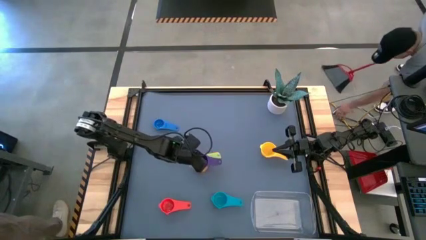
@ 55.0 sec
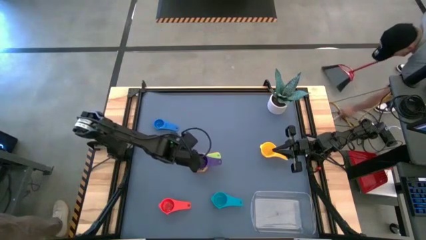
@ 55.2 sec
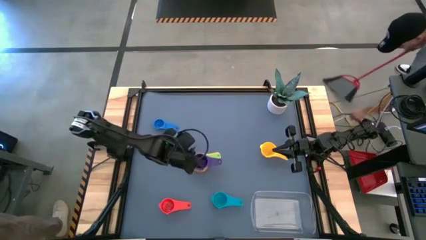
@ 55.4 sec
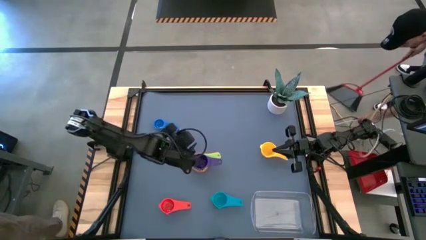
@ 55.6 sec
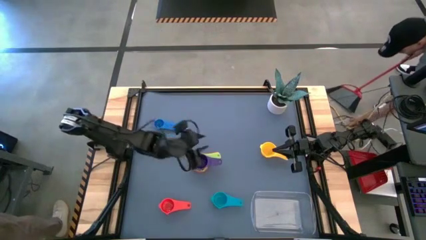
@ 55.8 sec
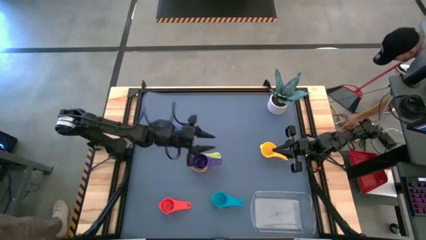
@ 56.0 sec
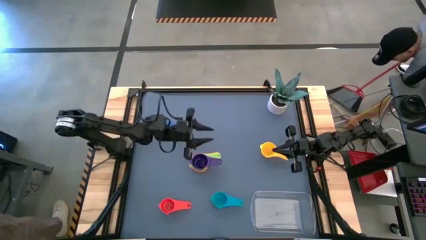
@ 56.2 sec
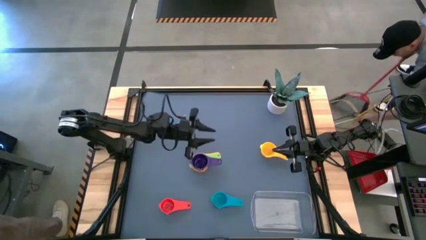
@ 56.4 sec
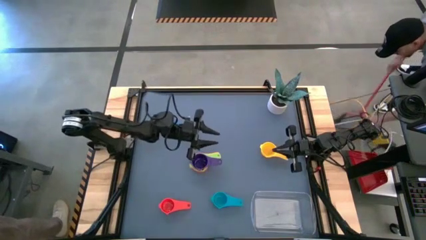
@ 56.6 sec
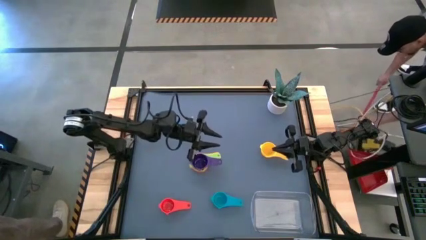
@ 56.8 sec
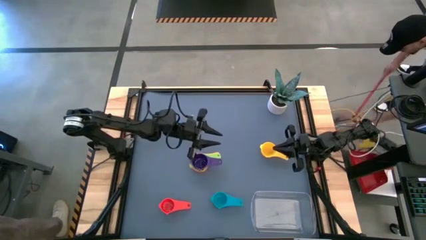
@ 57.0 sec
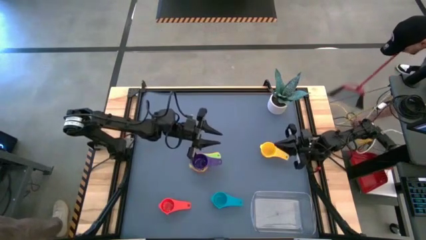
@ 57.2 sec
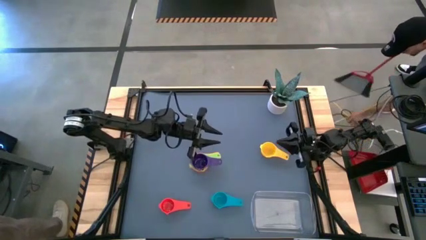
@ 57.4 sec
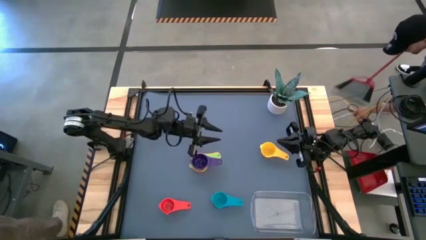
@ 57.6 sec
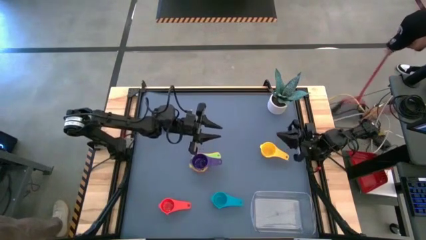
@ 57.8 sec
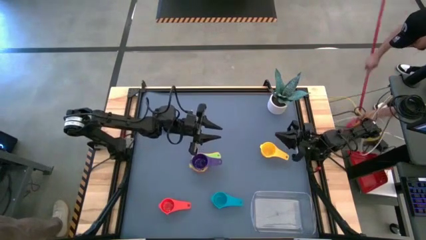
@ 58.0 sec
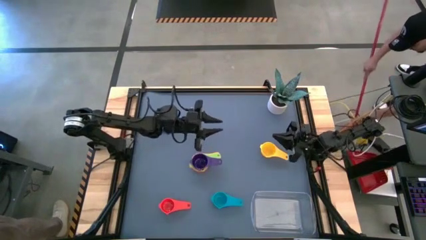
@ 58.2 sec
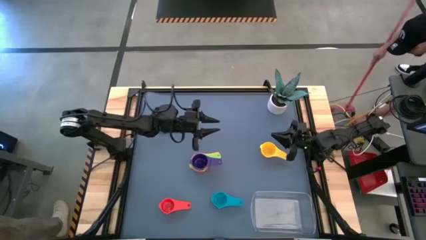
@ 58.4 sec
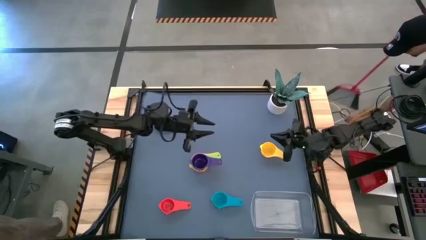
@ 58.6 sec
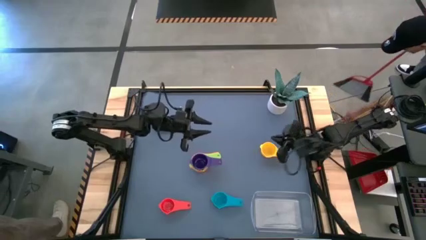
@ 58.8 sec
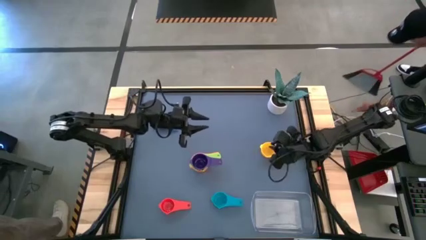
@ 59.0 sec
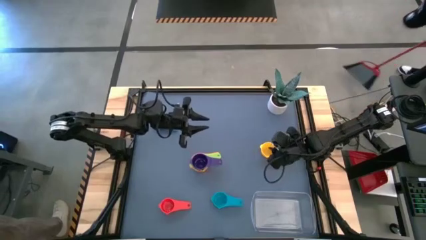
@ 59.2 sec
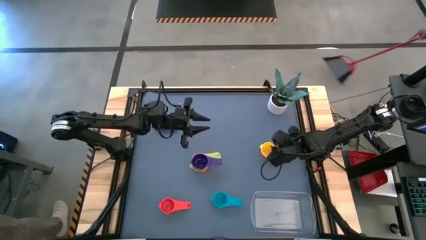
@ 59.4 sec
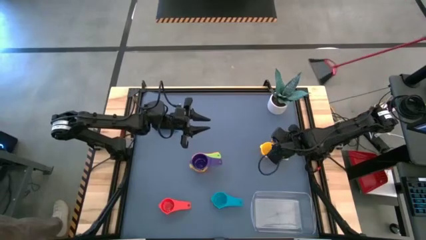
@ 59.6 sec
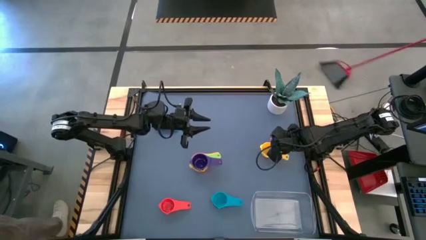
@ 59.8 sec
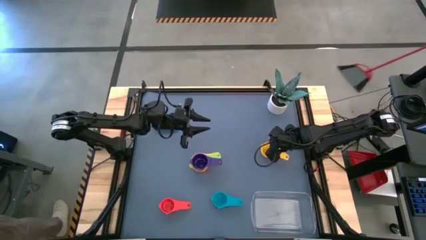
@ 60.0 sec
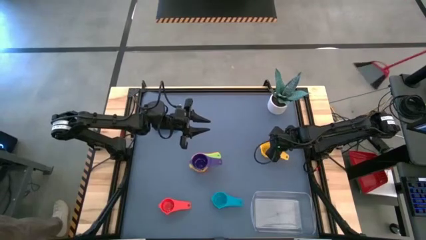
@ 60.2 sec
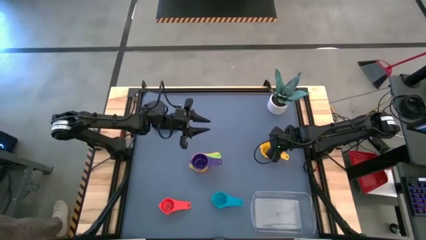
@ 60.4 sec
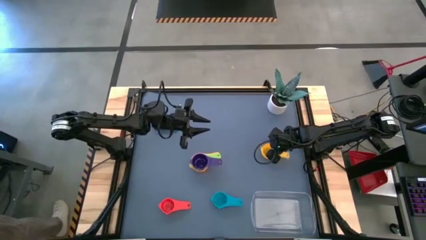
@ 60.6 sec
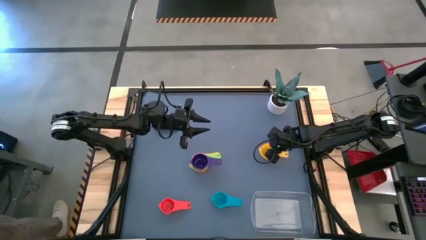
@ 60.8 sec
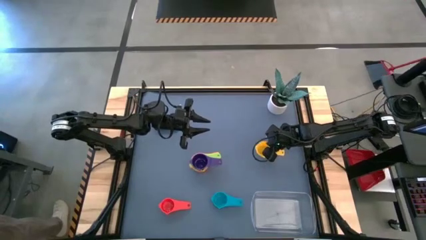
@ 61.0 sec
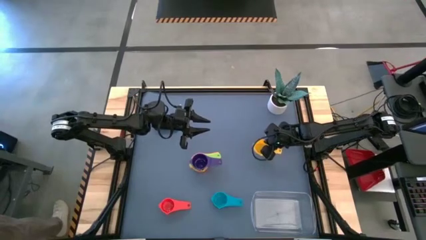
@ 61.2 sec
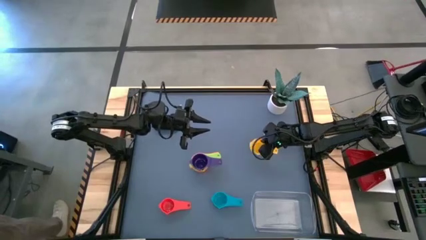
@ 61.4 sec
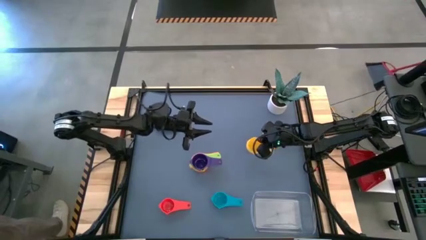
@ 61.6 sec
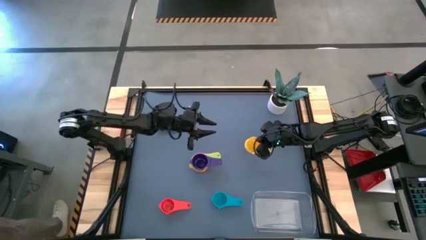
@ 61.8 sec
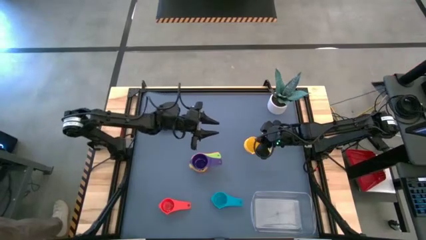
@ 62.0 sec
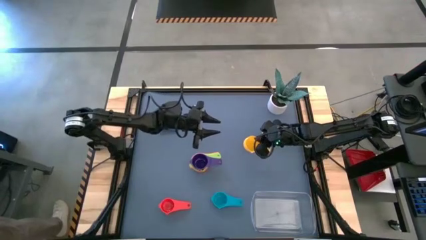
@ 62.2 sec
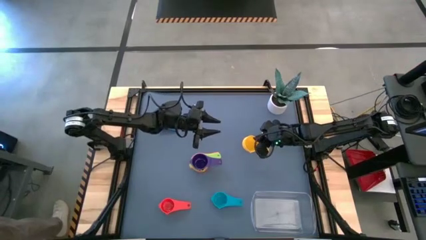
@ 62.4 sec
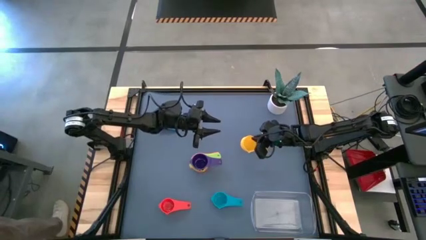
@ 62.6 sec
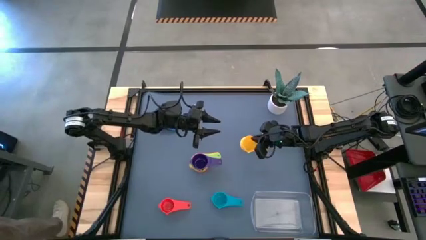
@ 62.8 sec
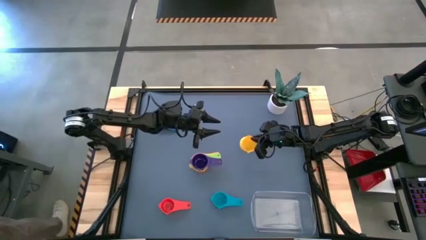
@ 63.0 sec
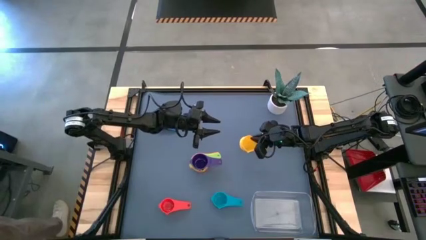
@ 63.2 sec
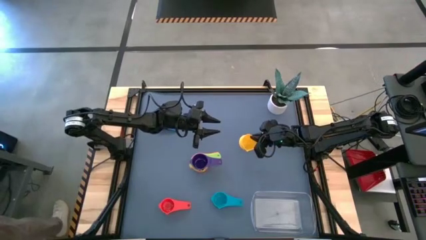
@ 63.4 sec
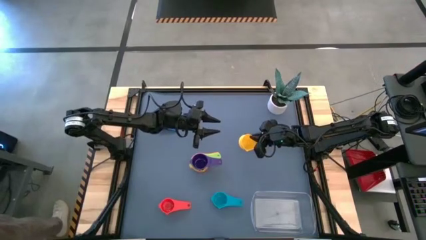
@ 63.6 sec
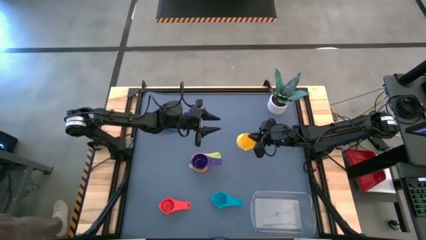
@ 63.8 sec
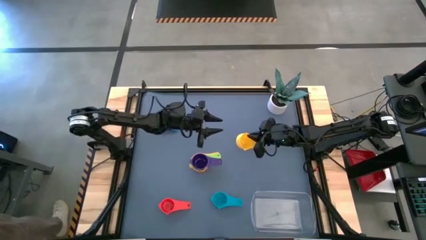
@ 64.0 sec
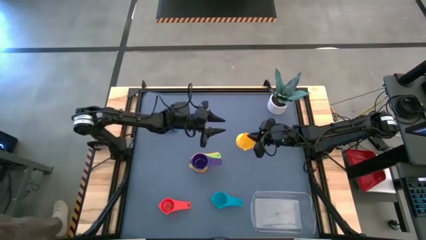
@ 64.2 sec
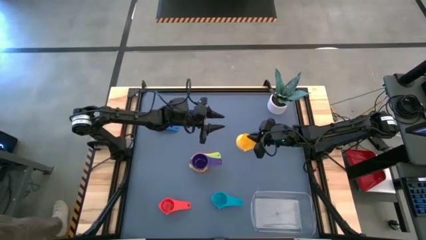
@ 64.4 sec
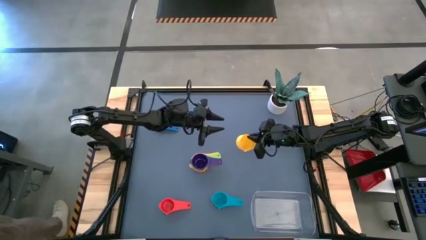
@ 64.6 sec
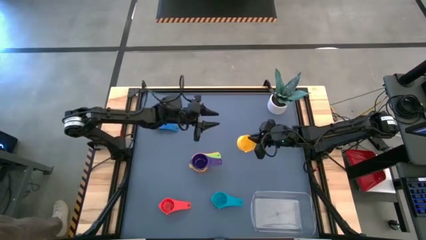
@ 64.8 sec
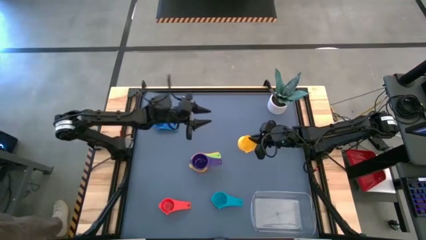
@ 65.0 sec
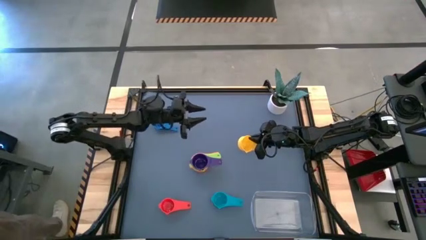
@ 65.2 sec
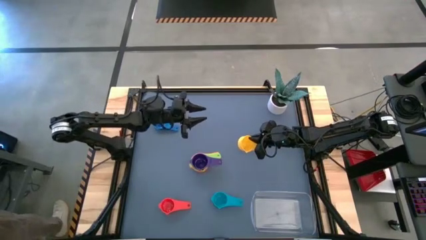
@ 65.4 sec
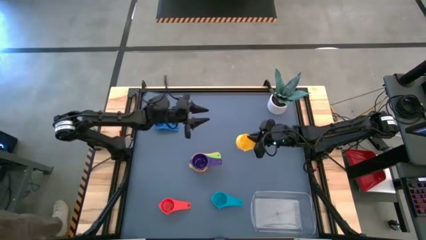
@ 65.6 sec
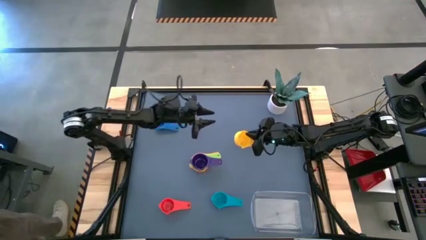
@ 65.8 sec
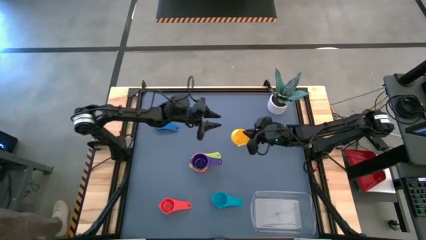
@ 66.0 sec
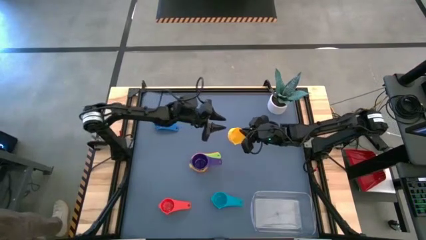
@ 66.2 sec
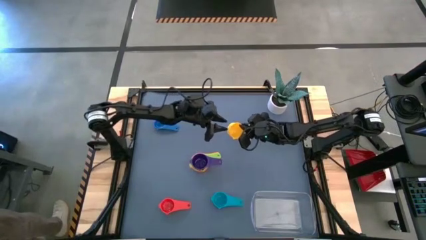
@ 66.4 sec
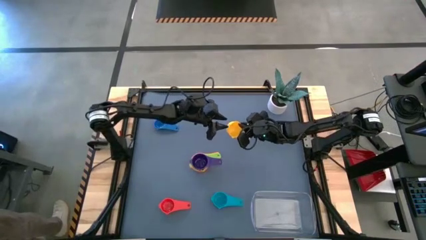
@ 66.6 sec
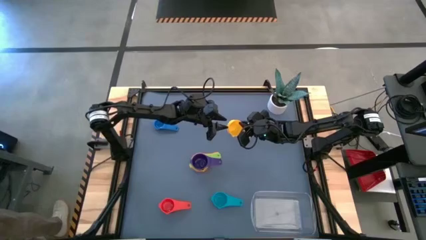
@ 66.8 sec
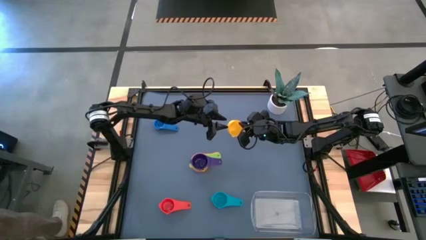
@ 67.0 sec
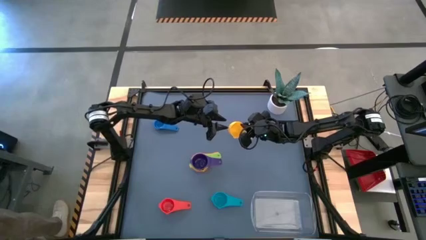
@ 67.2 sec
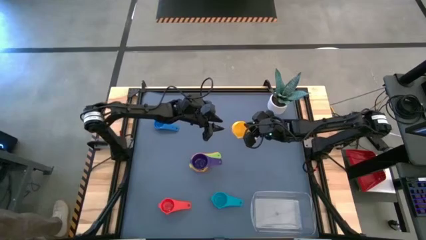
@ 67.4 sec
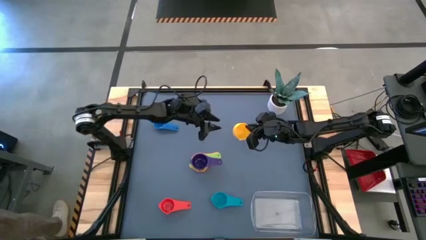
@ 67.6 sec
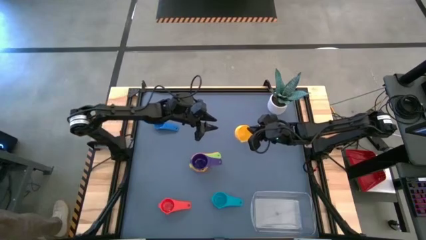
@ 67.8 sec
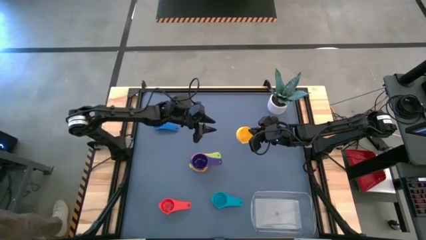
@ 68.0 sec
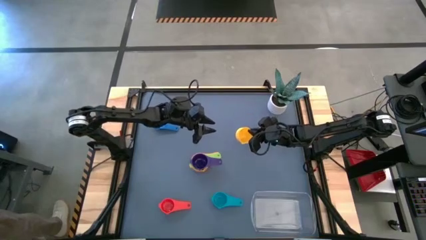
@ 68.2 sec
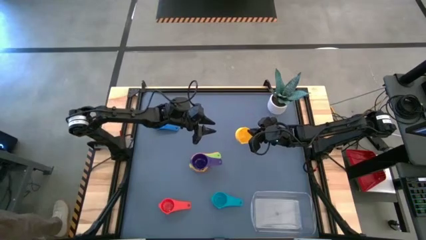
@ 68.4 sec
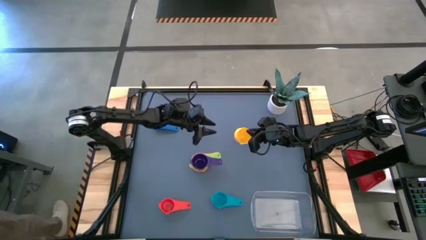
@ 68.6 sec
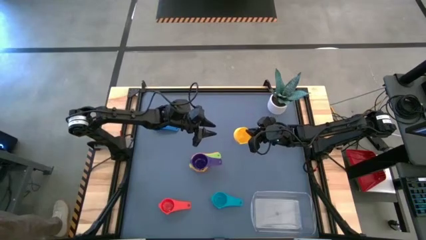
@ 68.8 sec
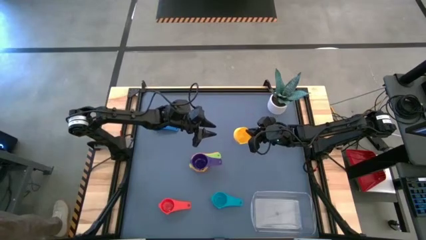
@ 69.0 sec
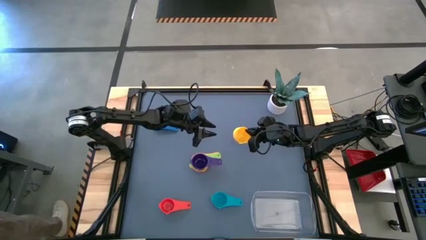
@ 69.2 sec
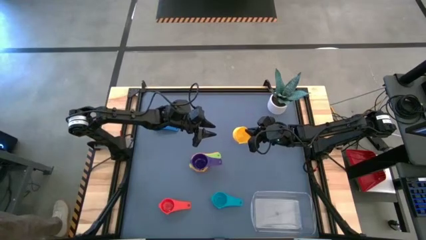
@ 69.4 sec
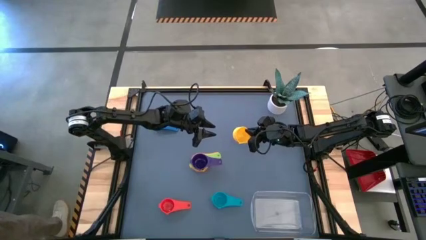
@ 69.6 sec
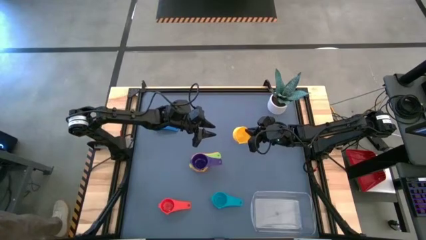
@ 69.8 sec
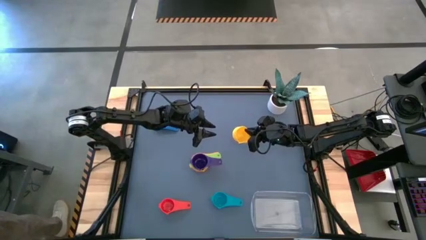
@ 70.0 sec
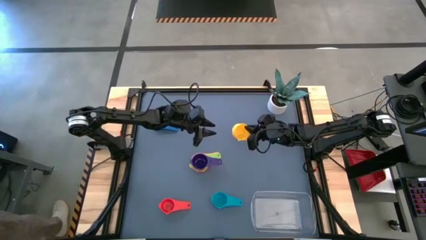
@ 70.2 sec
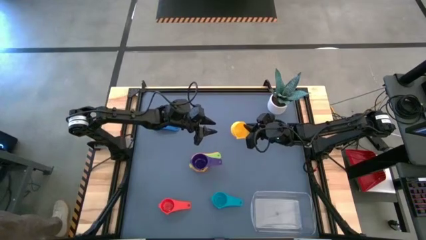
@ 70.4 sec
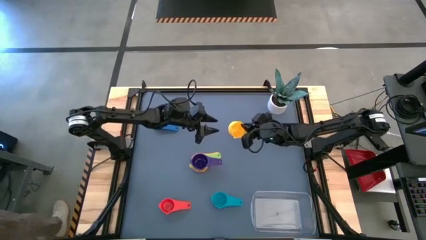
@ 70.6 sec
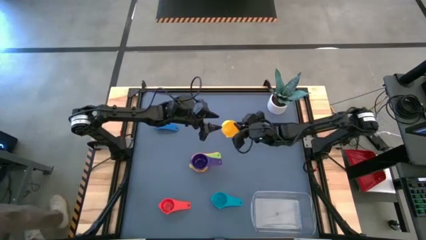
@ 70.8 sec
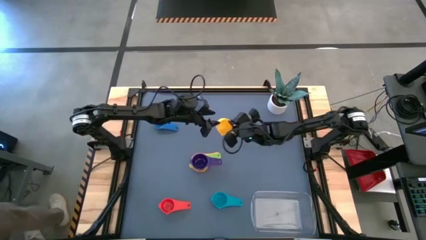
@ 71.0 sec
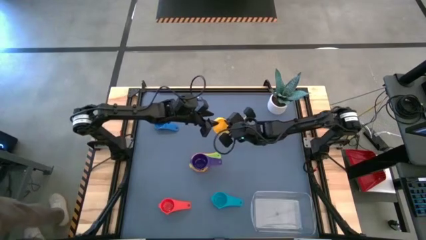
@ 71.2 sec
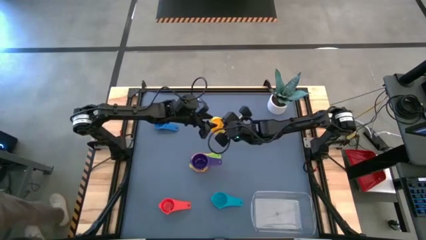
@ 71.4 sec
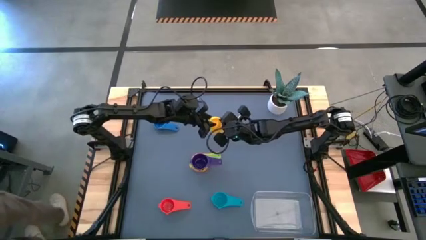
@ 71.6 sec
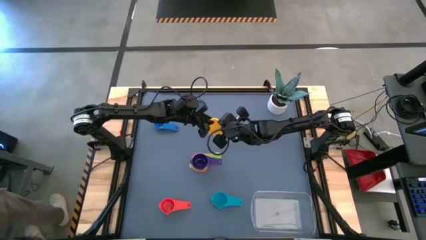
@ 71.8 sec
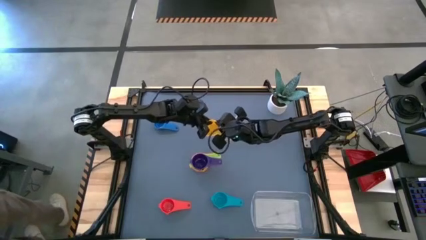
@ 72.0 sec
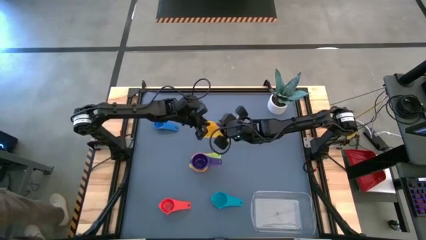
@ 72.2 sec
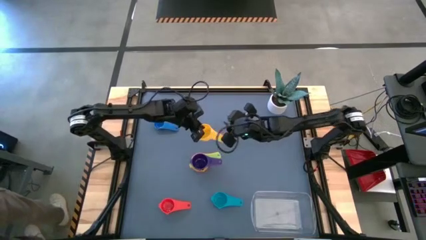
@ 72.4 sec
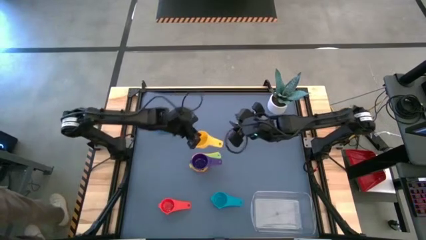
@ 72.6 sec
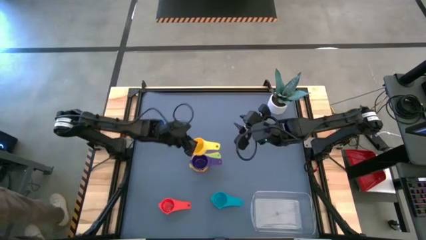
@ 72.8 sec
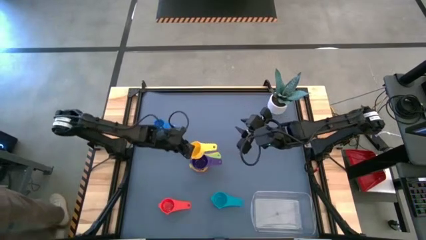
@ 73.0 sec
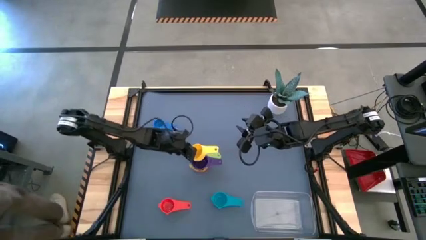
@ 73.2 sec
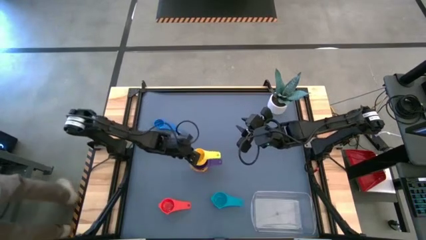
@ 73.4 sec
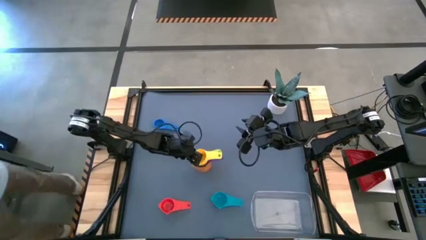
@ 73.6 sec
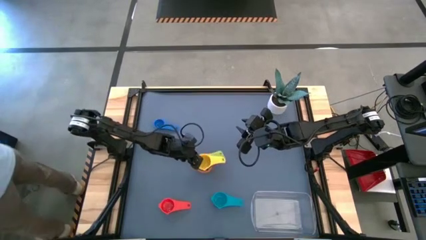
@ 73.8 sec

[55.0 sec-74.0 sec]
Task: Nest measuring cups in basket
Stack the yellow measuring cup on top of the purple measuring cup
